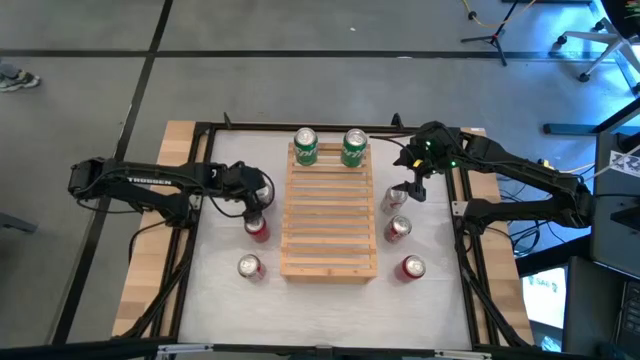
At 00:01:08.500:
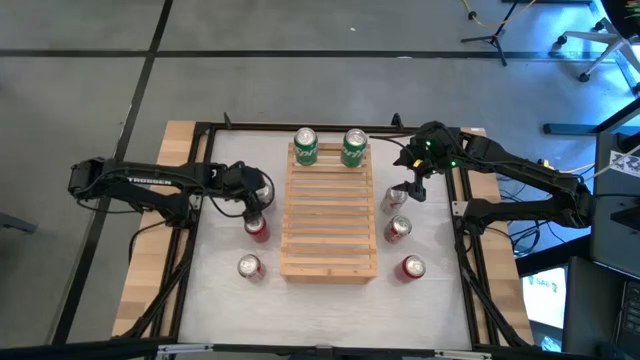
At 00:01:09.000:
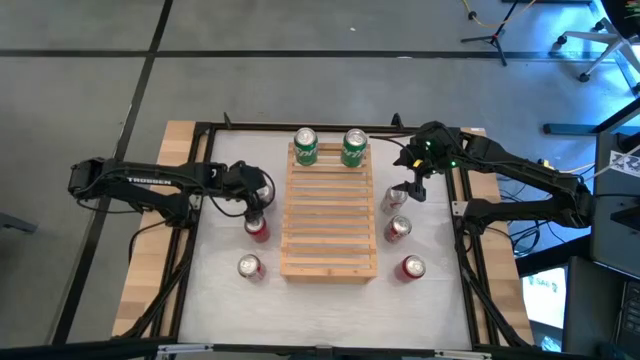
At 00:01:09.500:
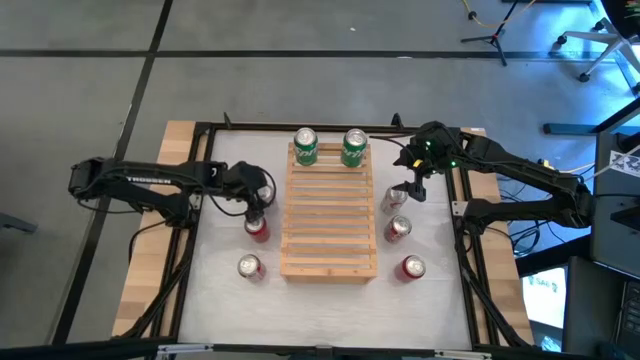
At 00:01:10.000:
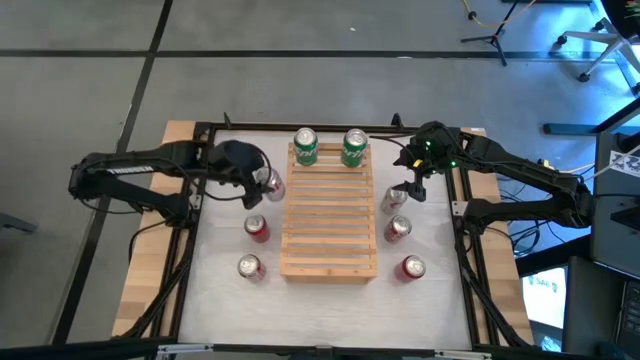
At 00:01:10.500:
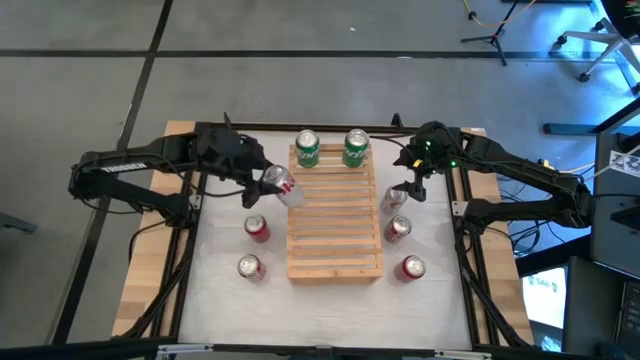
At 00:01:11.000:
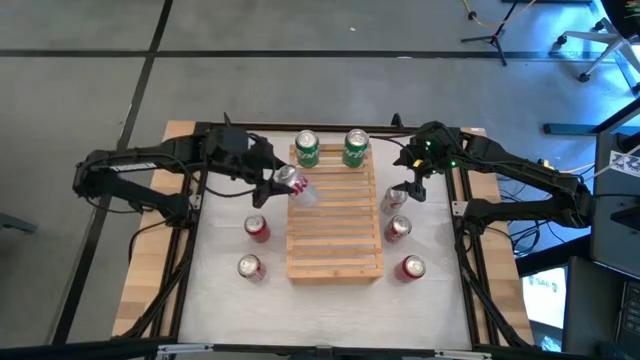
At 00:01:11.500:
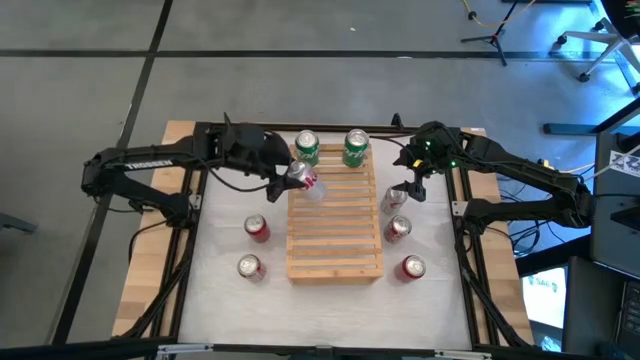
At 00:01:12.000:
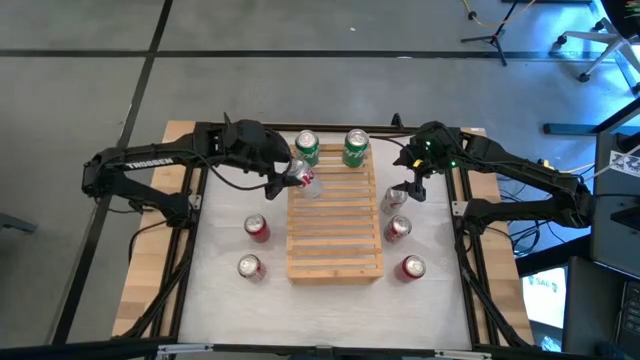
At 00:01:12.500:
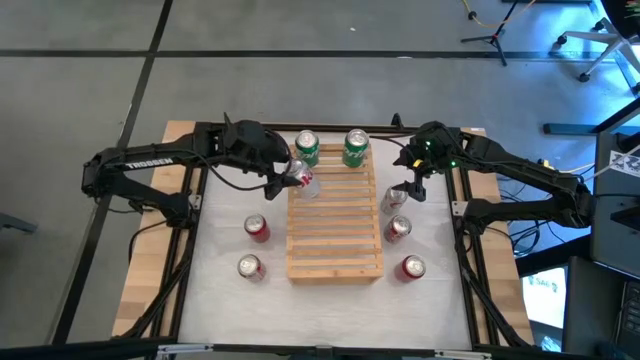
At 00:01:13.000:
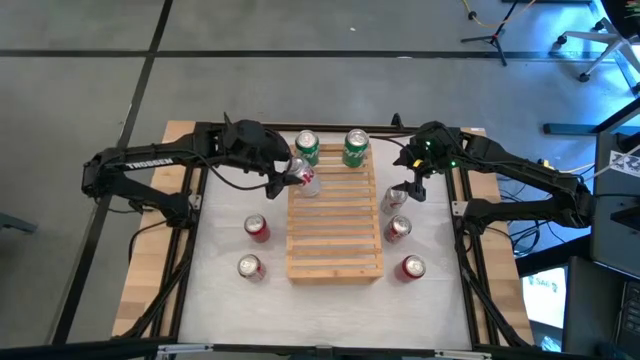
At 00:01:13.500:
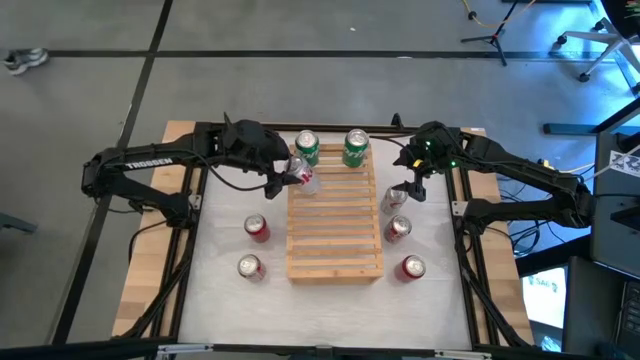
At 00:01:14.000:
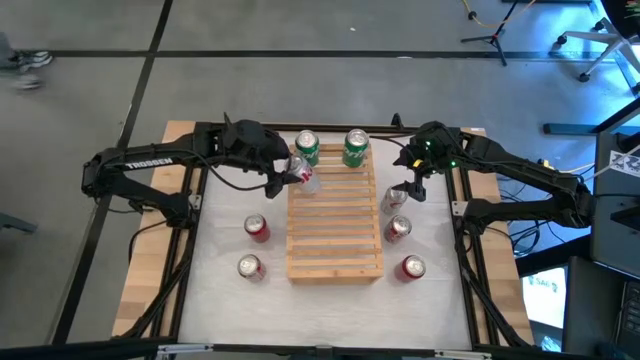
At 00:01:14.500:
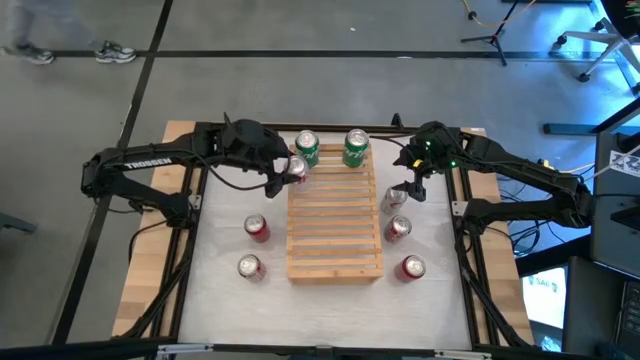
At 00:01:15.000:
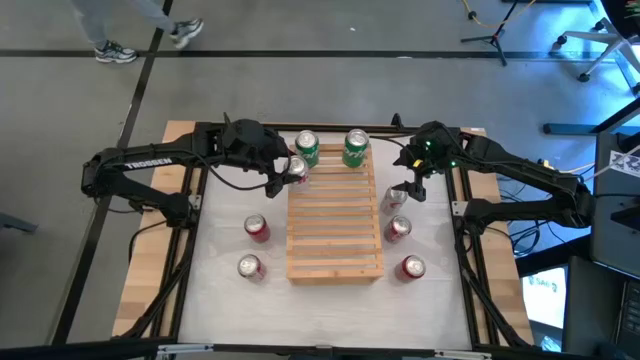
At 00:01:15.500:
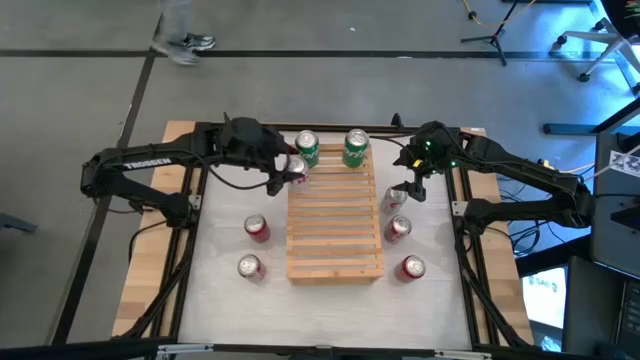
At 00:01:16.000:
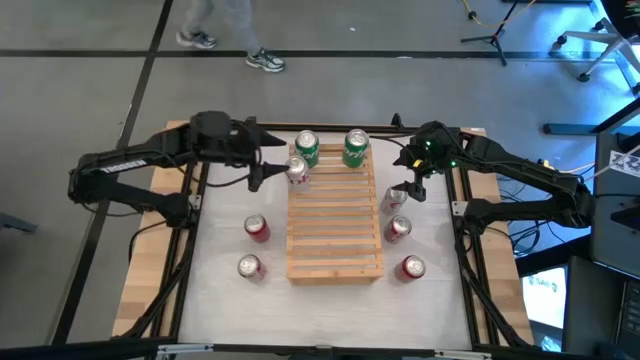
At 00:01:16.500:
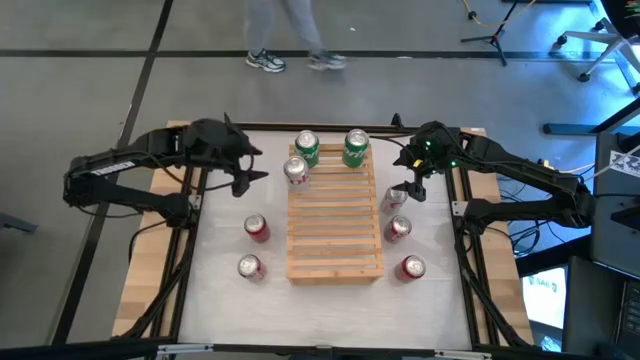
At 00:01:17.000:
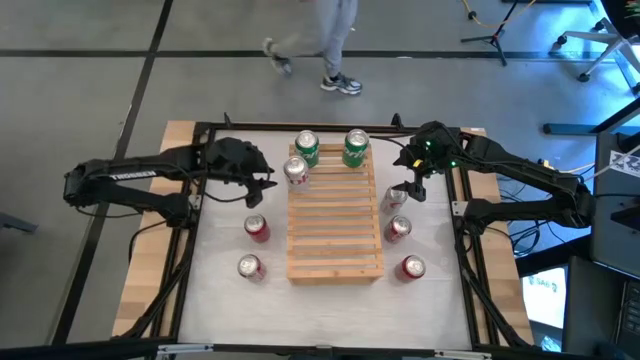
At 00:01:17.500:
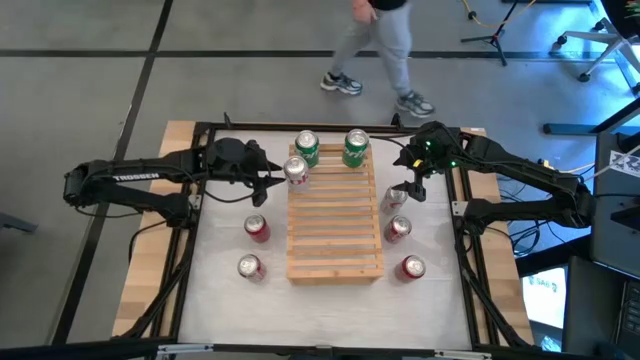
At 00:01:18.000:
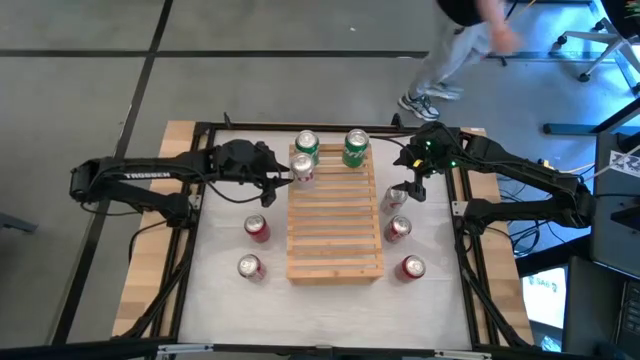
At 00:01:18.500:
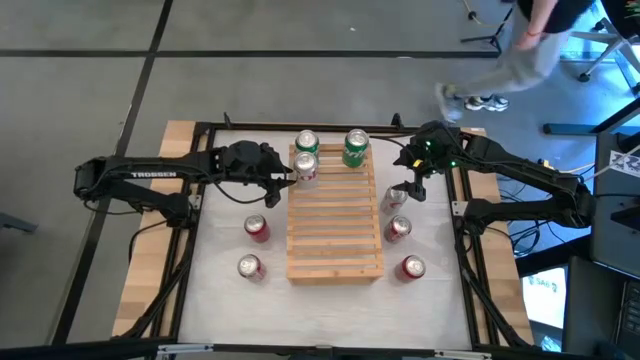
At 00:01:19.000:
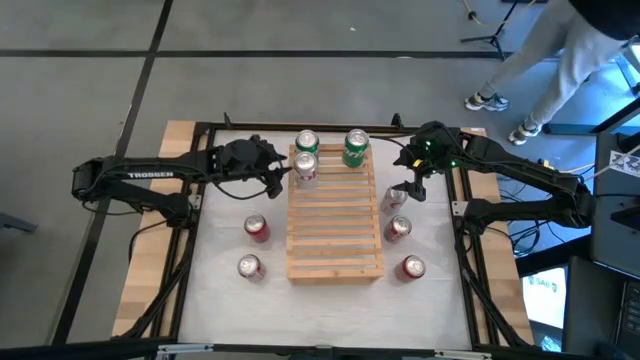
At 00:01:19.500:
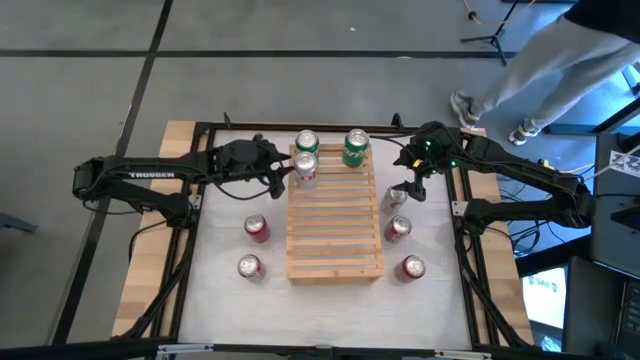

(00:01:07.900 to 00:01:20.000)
Task: Place canned beverage on shelf
Put the left red and silver soda can on the shelf

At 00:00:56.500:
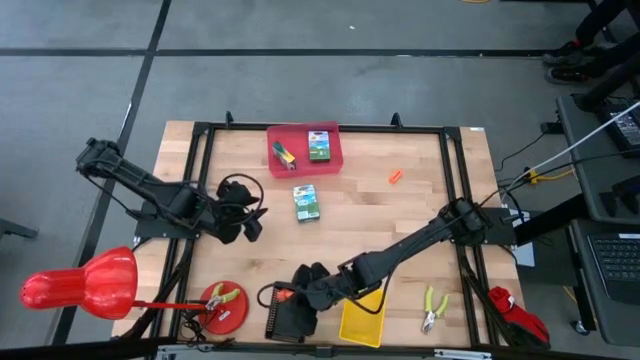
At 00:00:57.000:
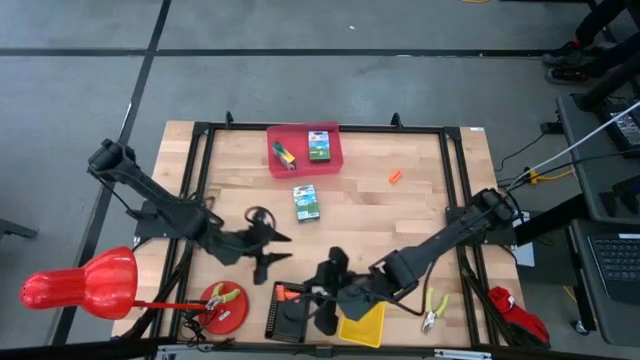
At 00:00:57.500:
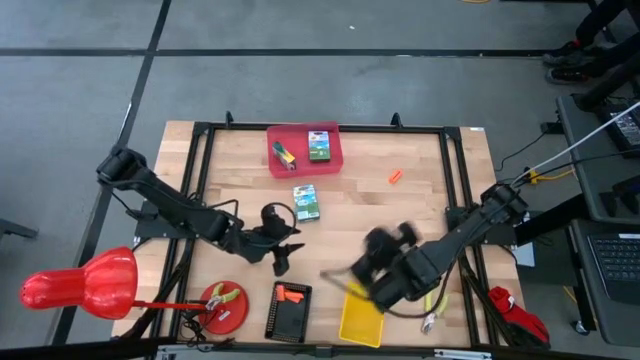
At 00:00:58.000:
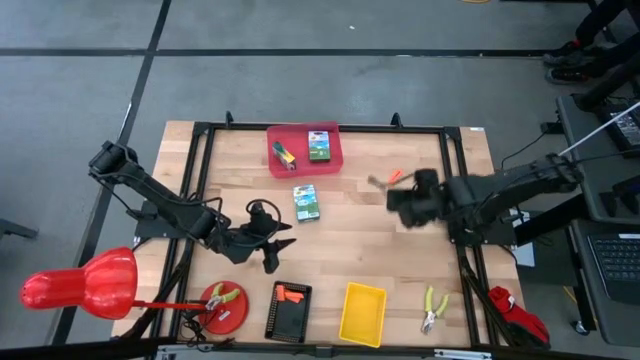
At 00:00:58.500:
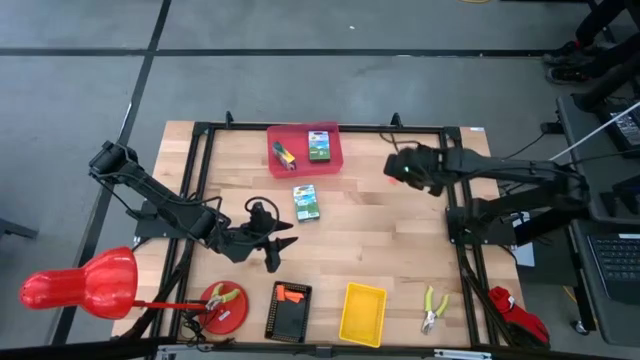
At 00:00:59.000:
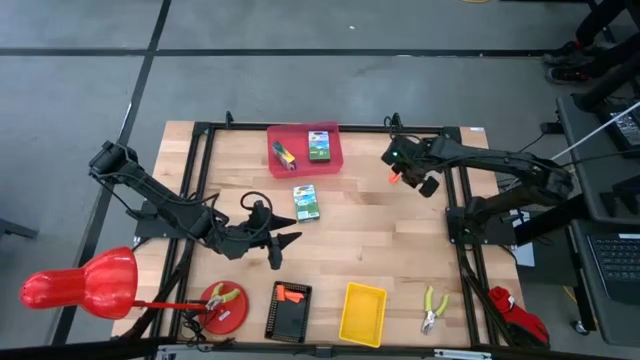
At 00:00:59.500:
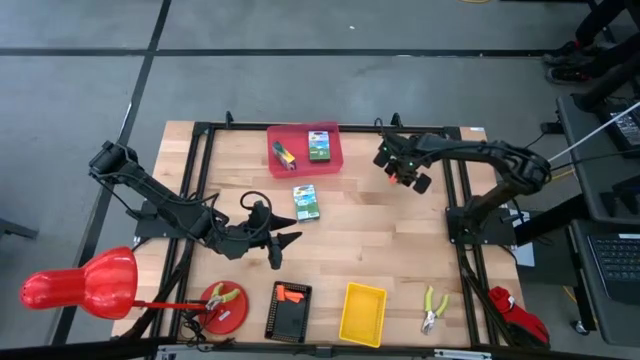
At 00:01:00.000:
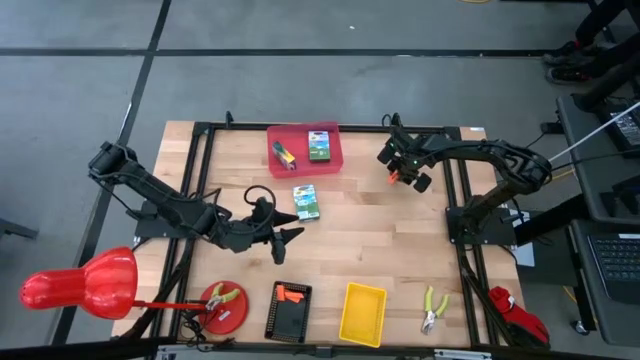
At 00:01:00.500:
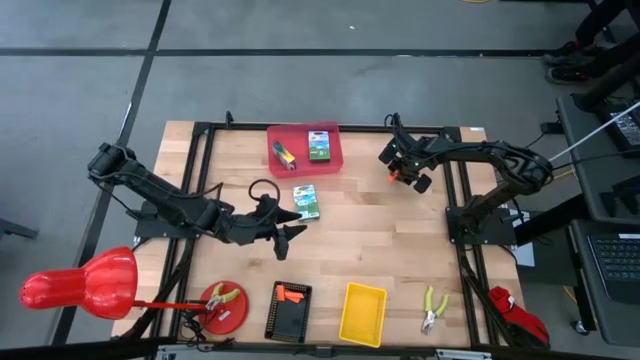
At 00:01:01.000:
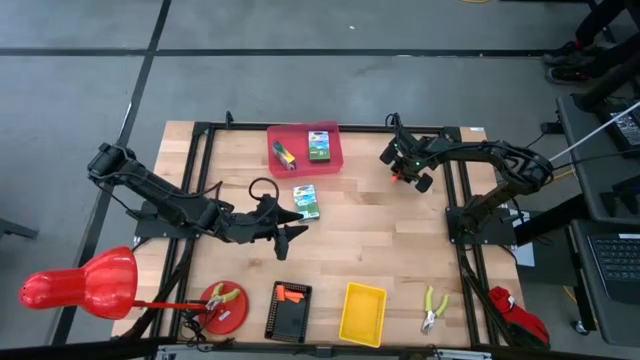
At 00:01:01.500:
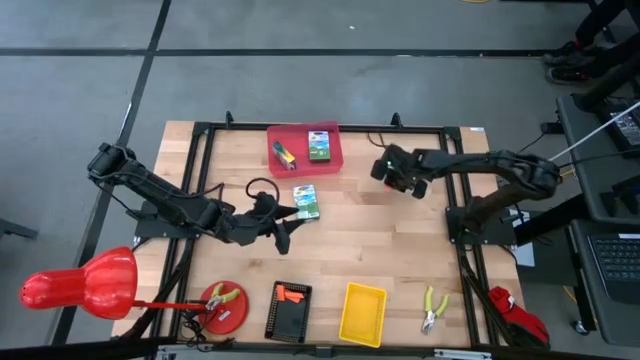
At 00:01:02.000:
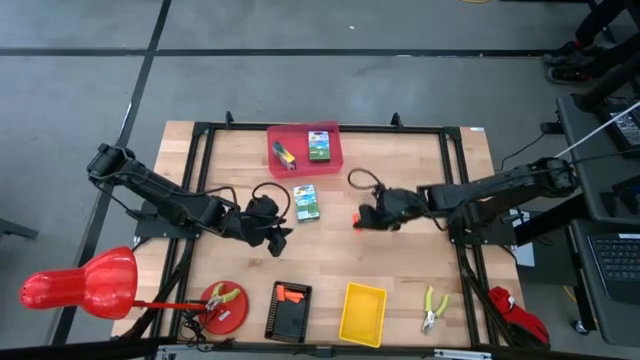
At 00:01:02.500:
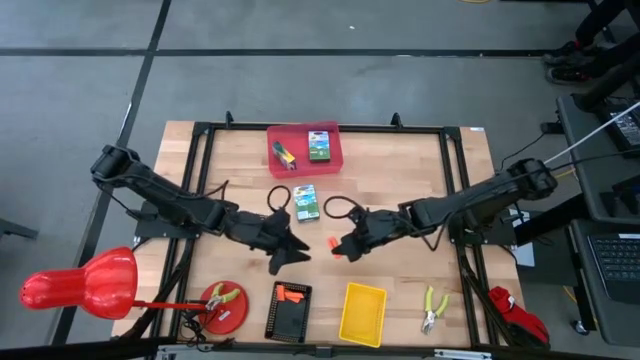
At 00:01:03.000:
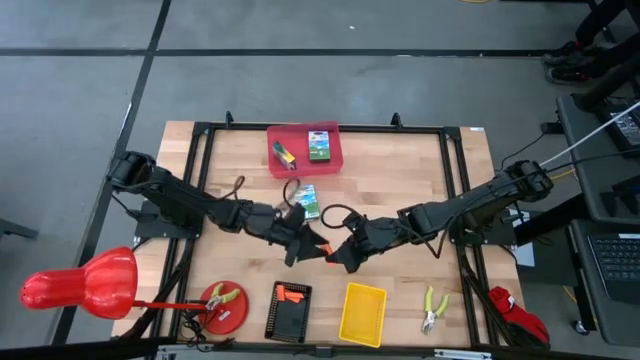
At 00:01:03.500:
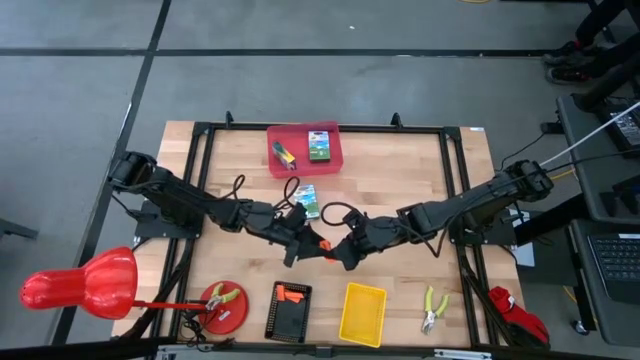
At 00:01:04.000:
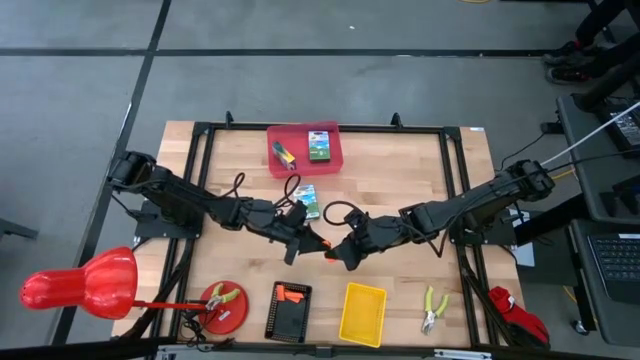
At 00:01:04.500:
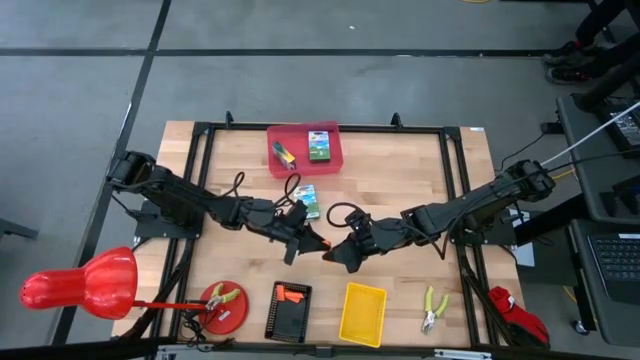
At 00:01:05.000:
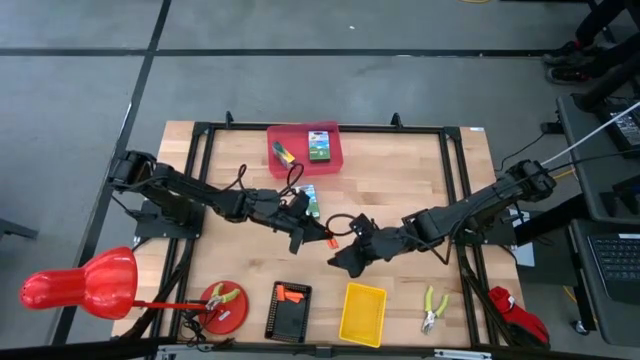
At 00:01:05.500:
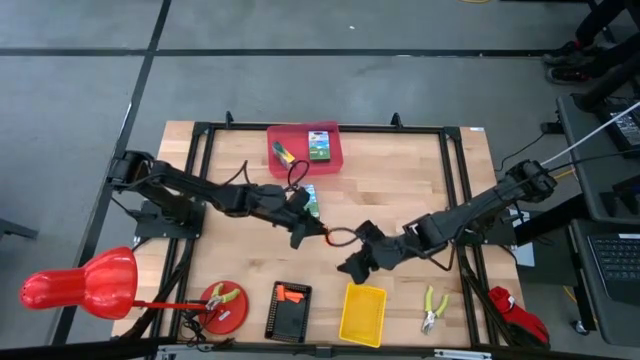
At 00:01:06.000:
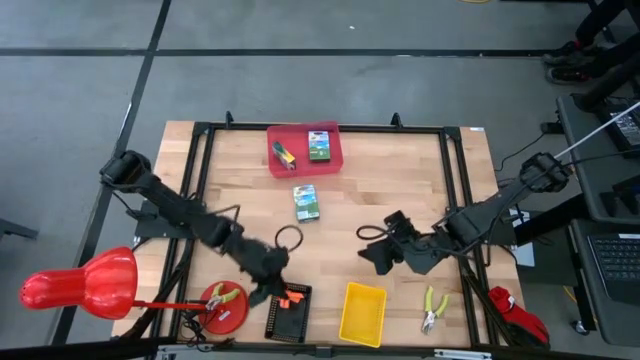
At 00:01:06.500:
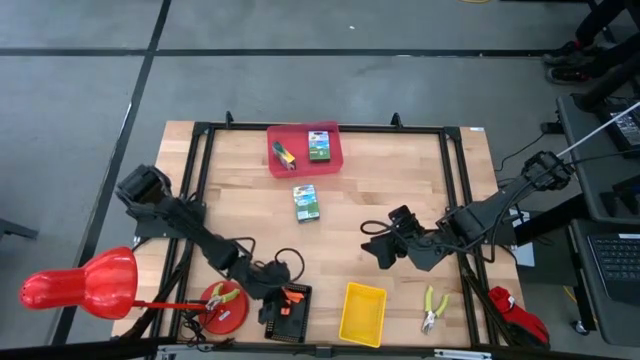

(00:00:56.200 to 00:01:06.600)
Task: Pick & Place School Supplies
Put the orange eraser into the black bin
